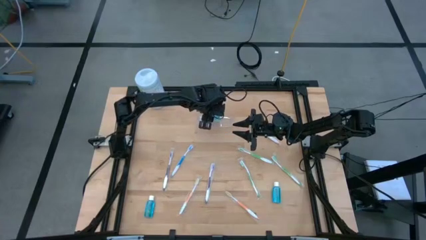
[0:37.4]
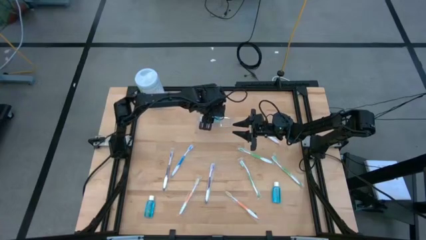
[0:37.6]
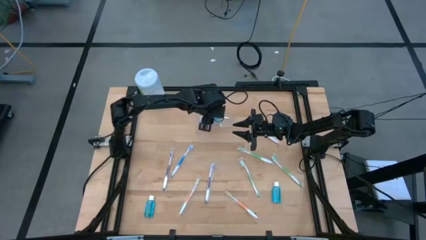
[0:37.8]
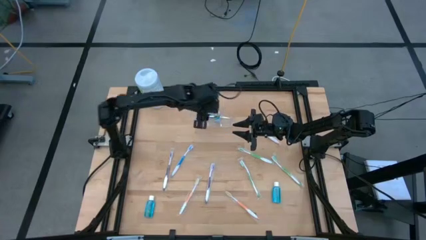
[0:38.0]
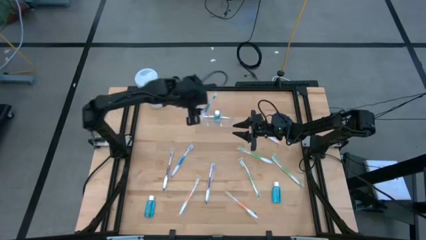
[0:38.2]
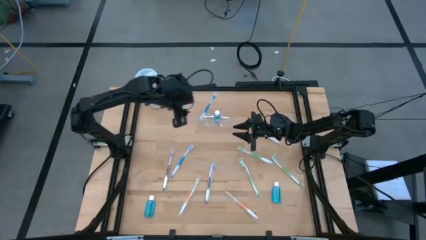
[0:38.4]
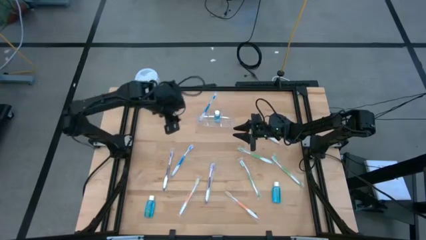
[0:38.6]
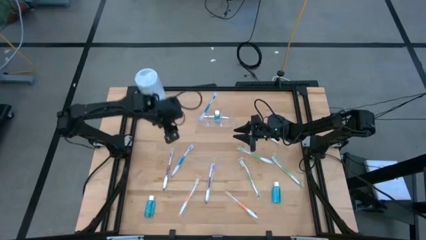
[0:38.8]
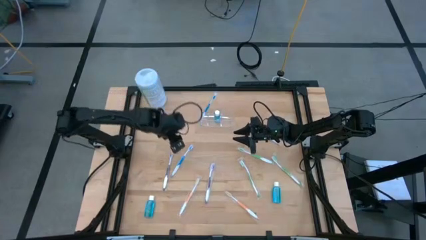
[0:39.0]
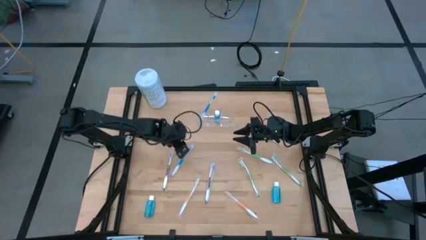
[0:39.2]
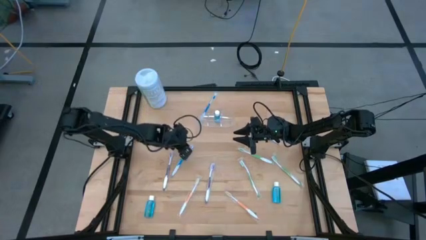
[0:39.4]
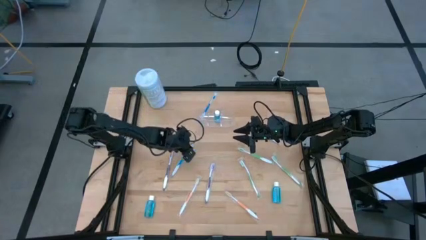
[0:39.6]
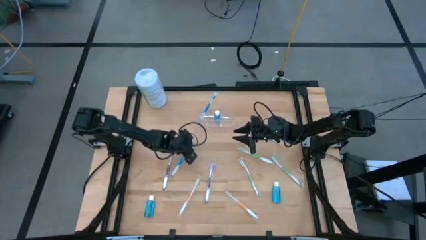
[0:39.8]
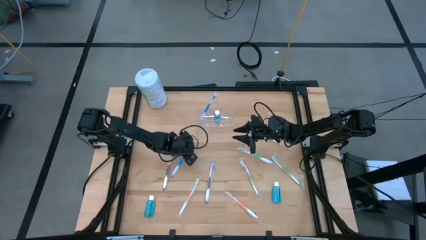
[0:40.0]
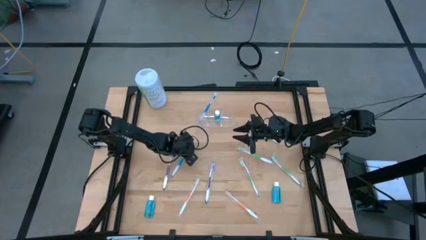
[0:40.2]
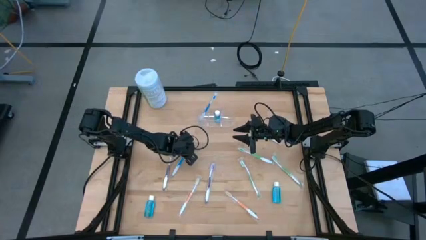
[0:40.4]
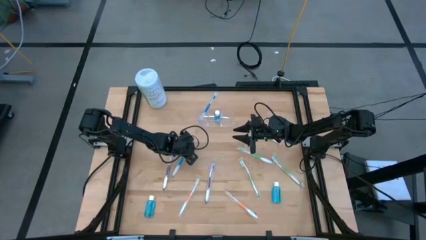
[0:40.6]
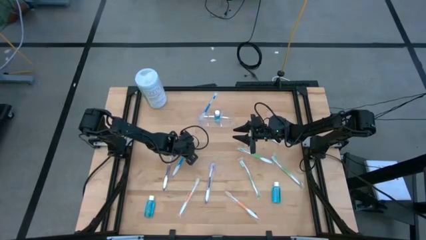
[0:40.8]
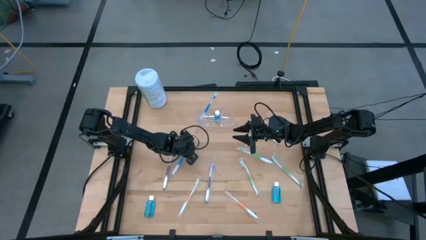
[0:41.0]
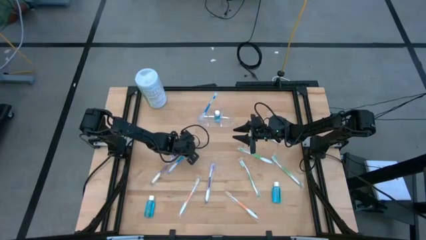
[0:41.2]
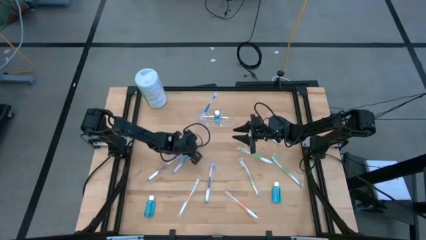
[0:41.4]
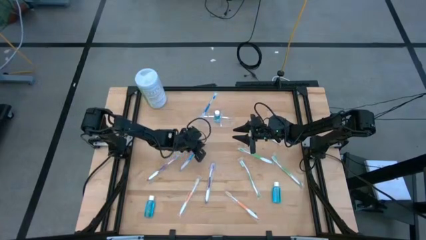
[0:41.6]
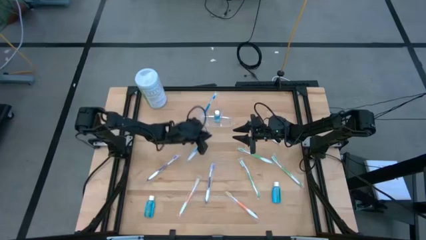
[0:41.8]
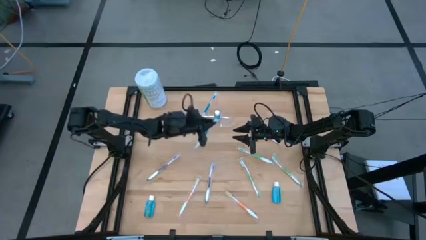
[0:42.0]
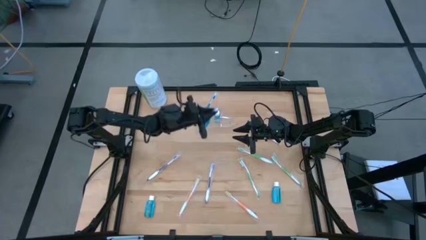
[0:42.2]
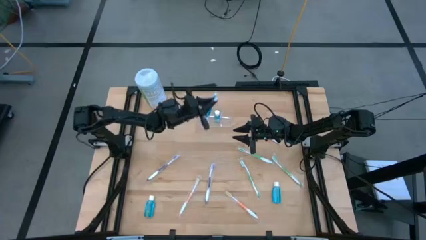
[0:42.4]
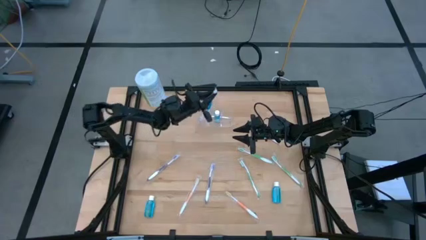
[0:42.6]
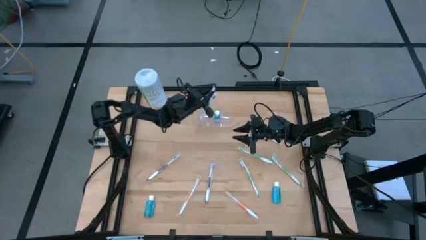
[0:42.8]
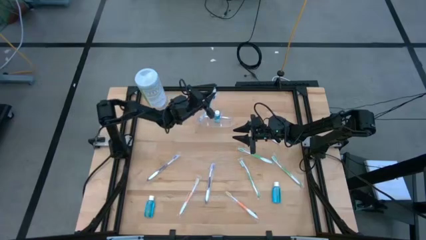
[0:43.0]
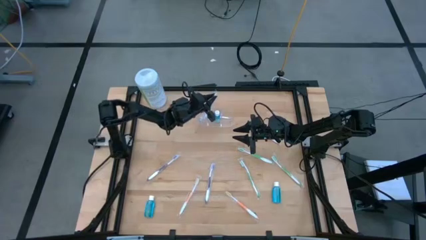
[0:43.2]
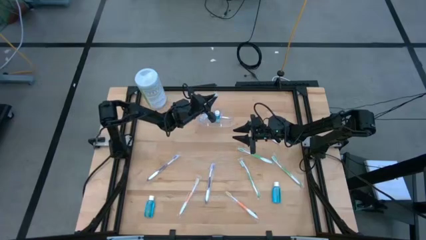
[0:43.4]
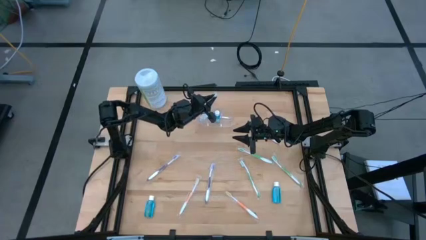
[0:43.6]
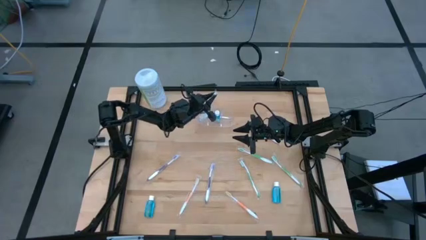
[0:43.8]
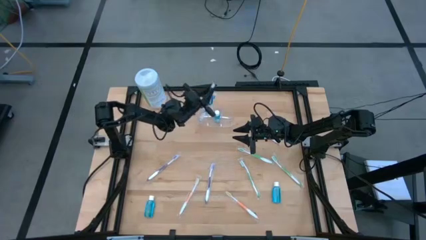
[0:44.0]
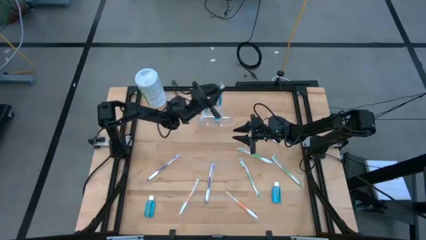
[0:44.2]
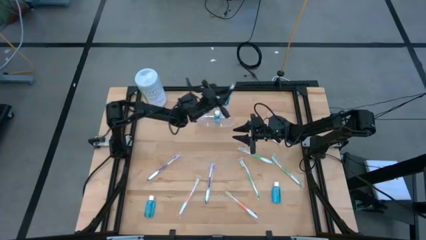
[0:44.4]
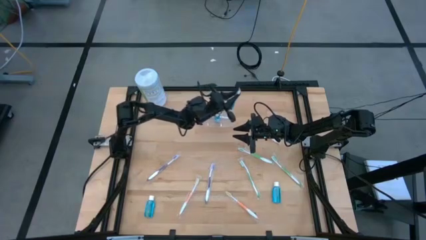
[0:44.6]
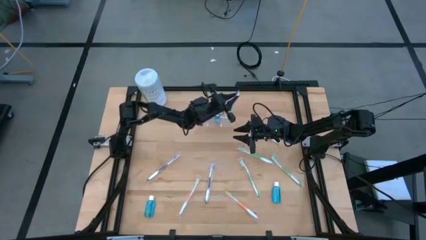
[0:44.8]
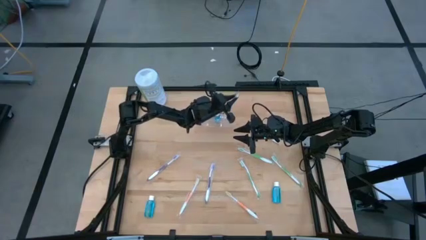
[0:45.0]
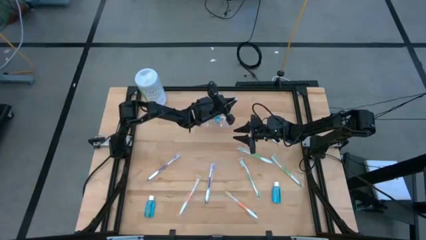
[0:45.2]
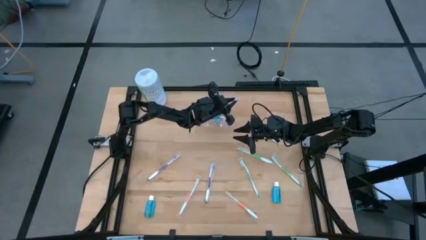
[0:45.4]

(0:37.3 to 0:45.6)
Task: Pick & Place toothbrushing station
Put the blue toothbrush into the transparent organizer

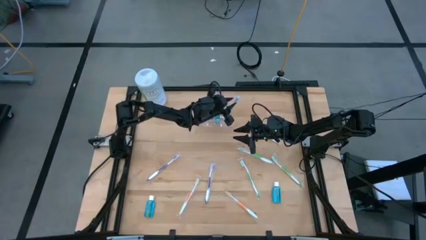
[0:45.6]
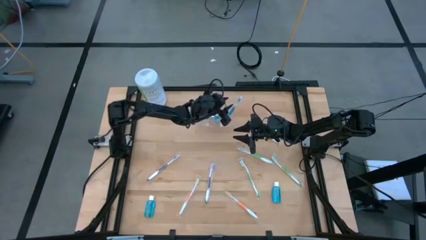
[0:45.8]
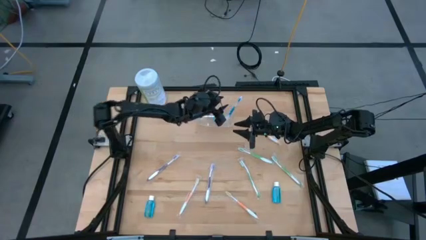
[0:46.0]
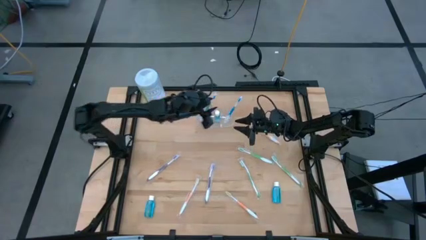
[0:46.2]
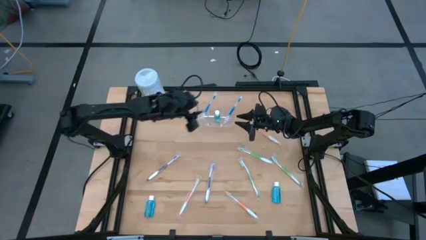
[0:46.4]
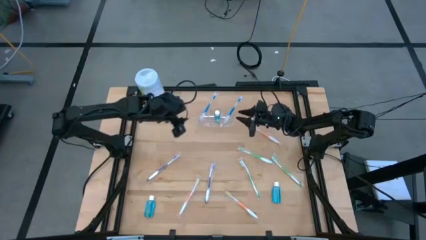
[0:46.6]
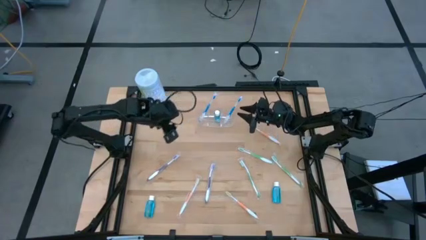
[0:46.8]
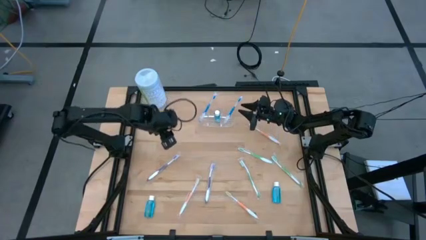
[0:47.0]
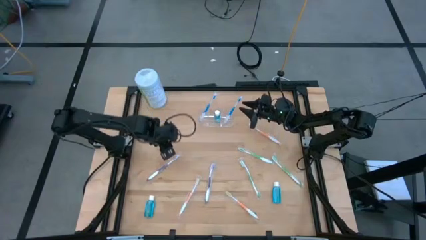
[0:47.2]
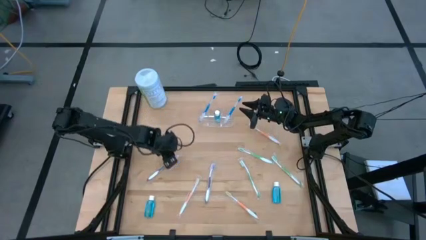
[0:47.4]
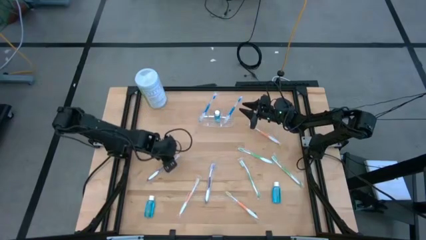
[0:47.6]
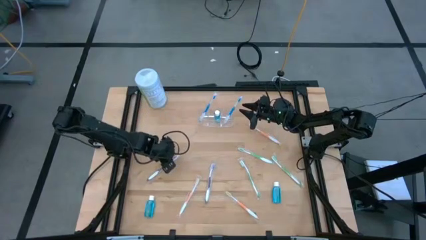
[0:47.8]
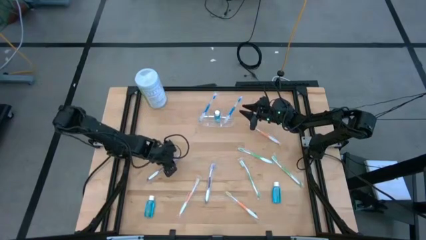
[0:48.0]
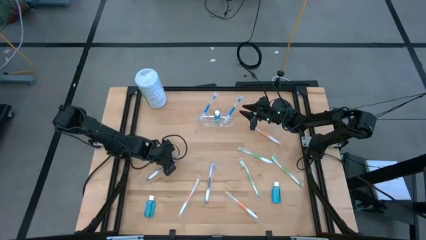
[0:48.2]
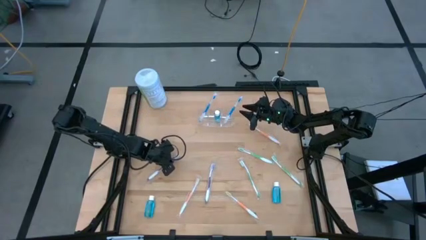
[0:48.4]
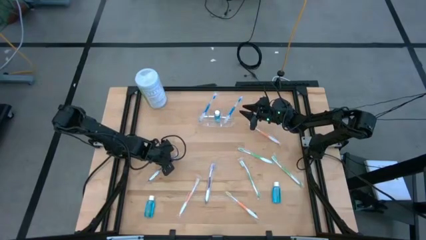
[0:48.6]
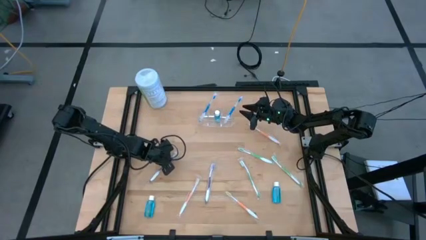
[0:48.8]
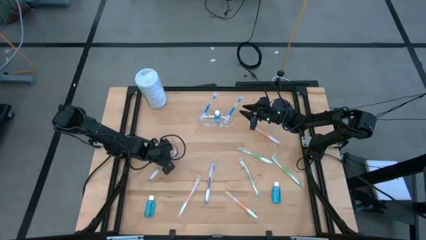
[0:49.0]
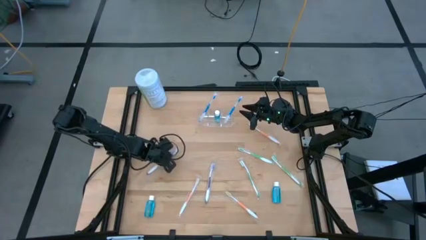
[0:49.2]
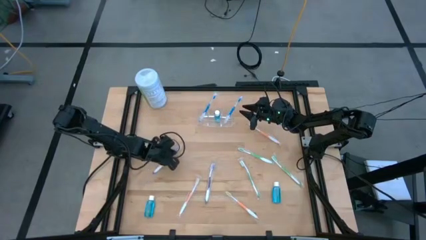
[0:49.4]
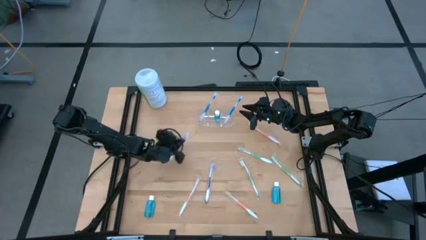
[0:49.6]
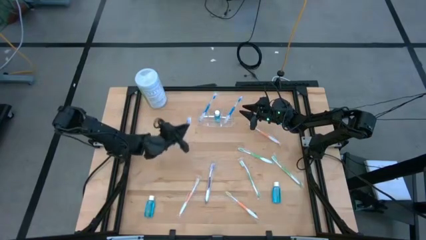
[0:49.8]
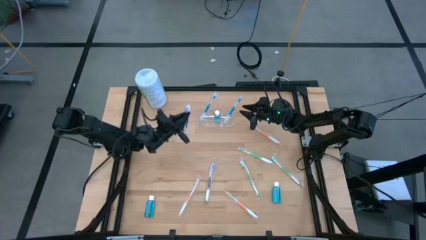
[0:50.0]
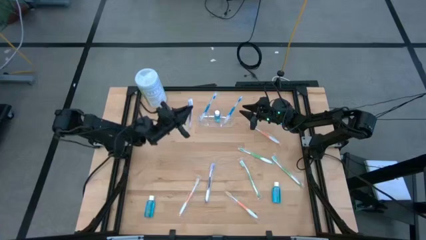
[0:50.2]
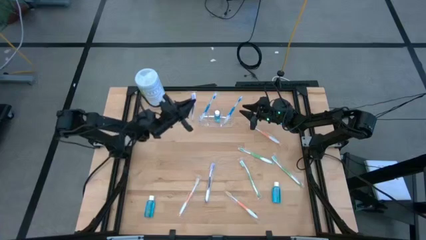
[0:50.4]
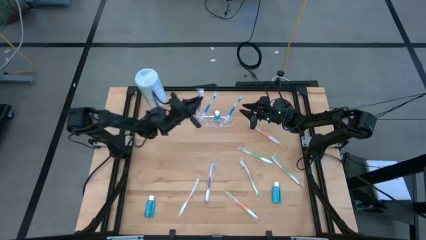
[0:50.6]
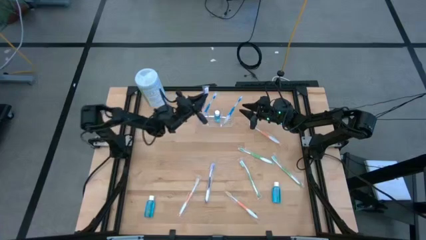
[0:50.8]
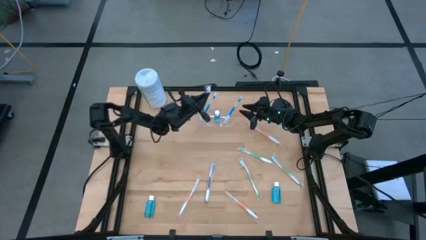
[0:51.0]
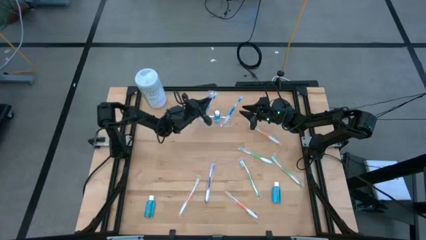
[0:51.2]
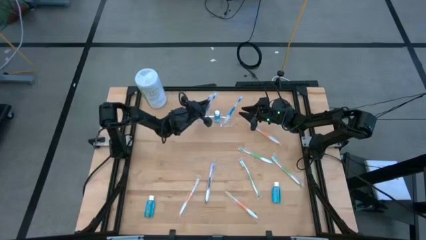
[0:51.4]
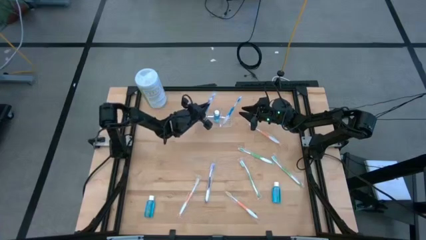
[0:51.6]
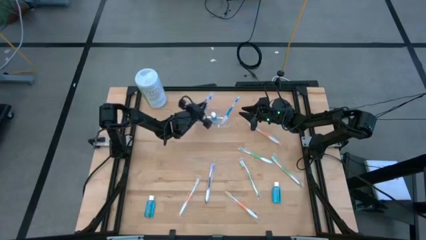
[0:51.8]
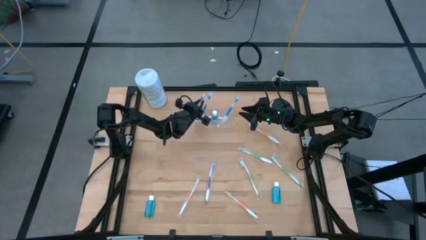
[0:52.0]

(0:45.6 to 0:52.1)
Put the left purple toothbrush into the transparent organizer

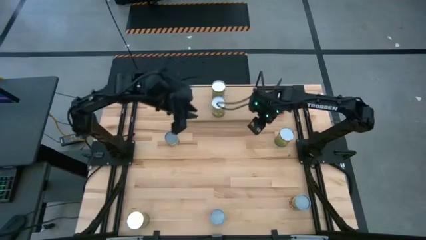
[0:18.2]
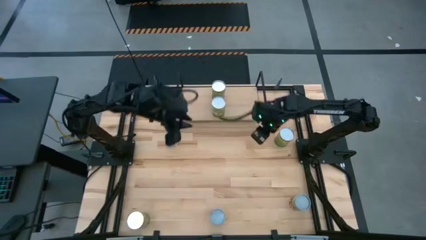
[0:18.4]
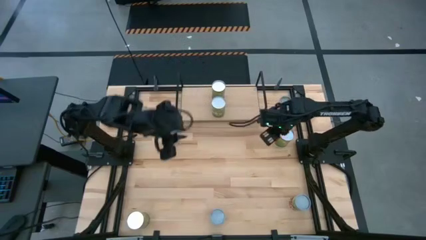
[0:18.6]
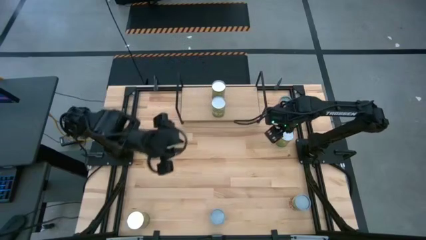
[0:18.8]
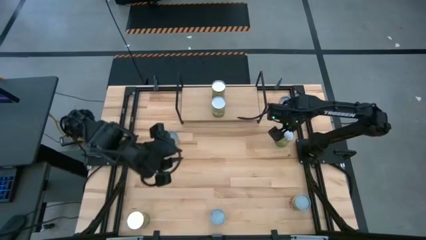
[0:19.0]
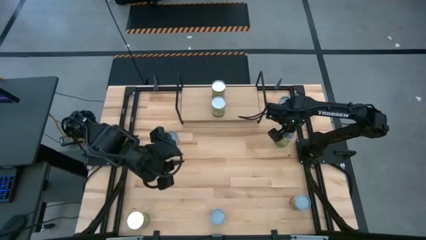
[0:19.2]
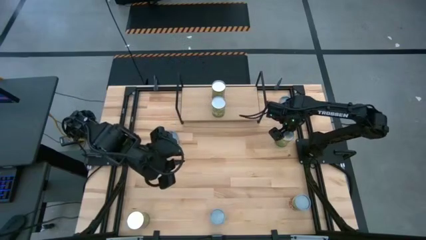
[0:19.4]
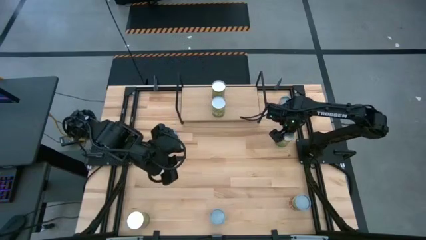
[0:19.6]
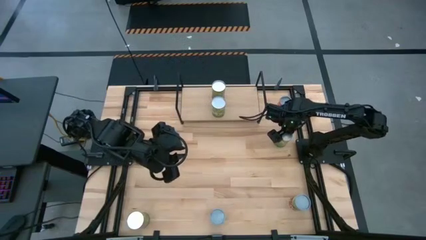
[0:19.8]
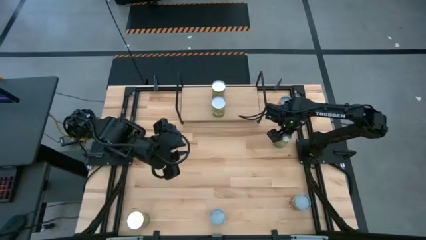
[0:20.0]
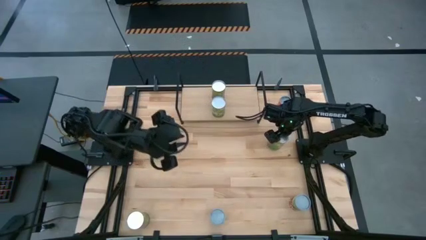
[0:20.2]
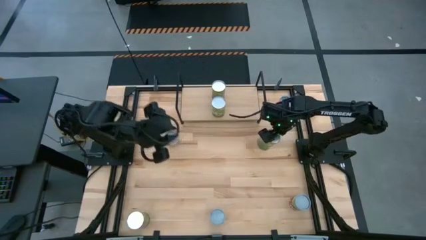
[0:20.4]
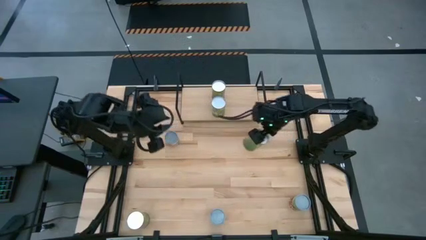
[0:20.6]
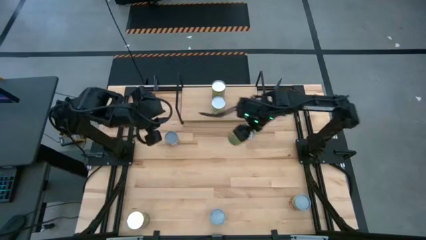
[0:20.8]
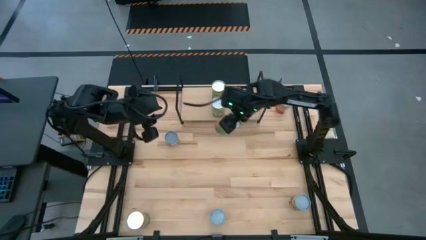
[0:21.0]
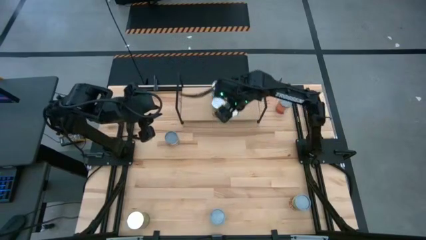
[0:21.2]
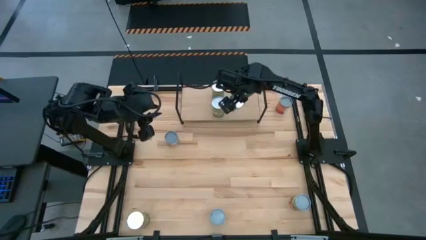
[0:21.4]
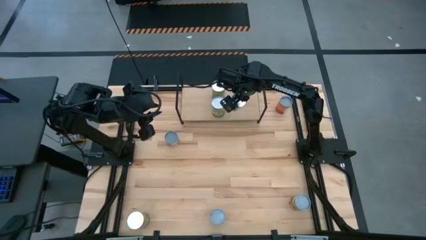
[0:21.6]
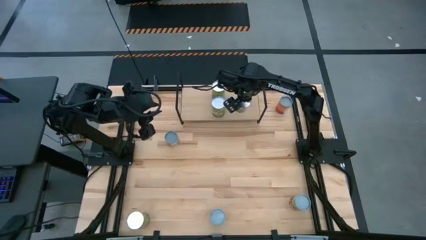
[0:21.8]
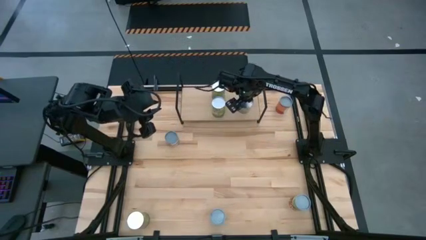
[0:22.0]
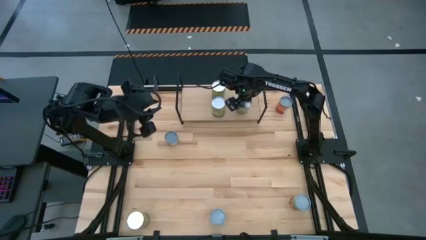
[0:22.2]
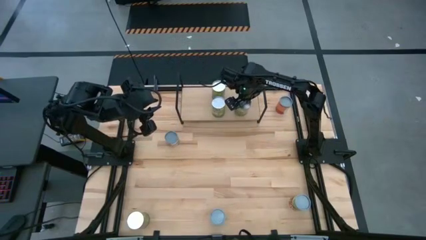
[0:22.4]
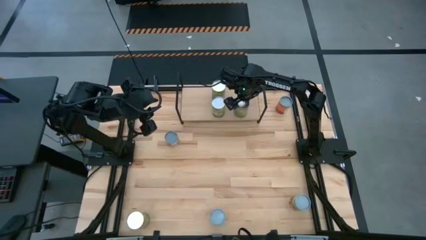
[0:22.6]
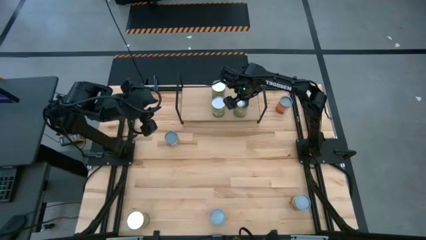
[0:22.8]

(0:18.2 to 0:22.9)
Task: Pick and place cans onto a shelf
Put the top large canned oranges on the shelf
